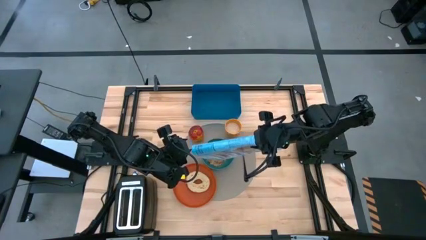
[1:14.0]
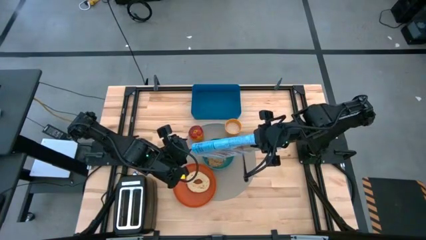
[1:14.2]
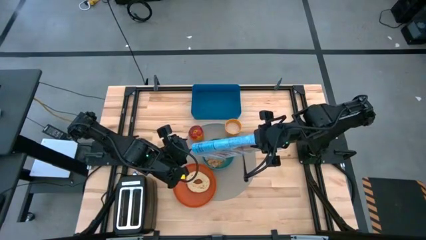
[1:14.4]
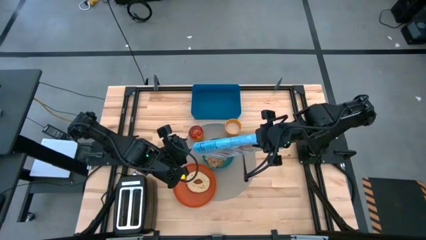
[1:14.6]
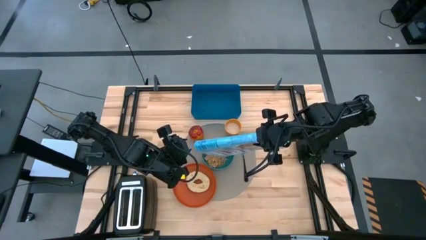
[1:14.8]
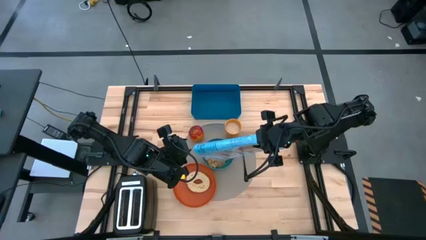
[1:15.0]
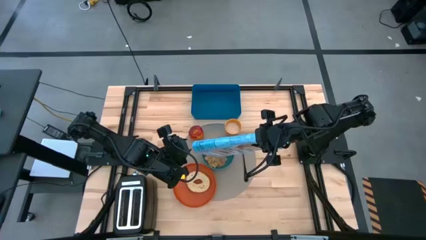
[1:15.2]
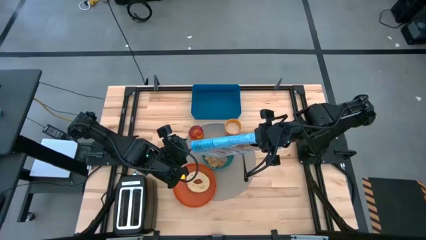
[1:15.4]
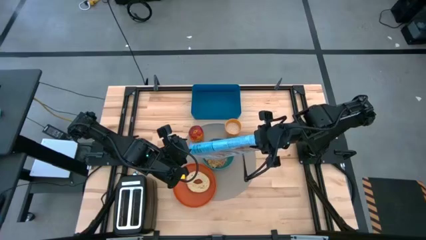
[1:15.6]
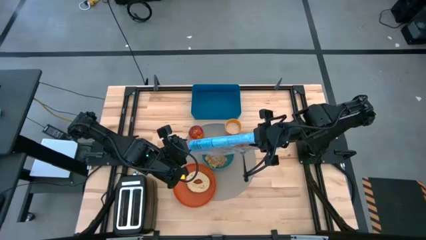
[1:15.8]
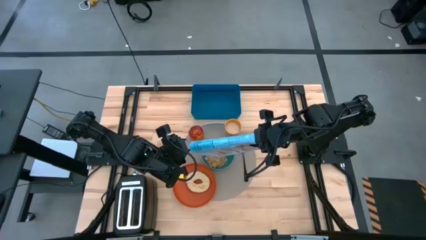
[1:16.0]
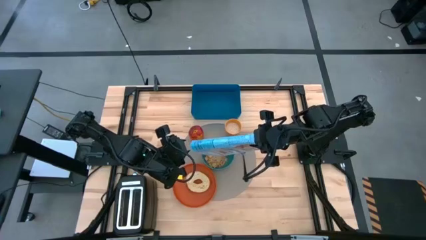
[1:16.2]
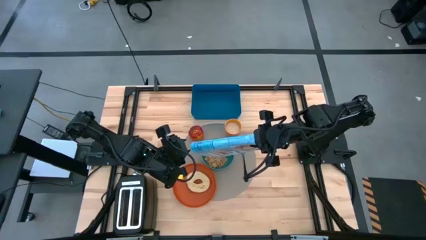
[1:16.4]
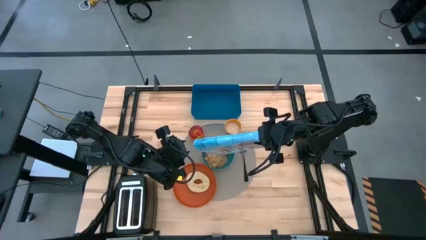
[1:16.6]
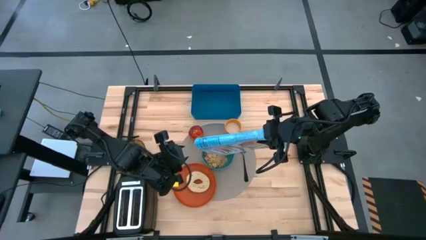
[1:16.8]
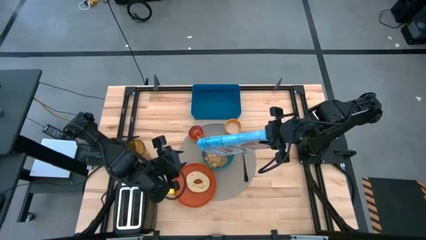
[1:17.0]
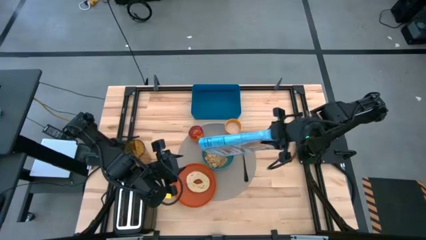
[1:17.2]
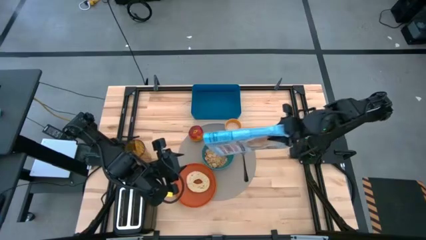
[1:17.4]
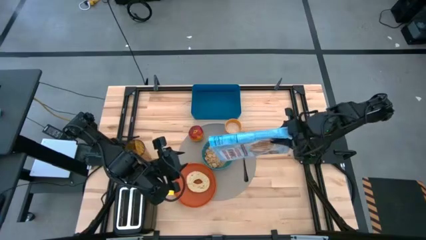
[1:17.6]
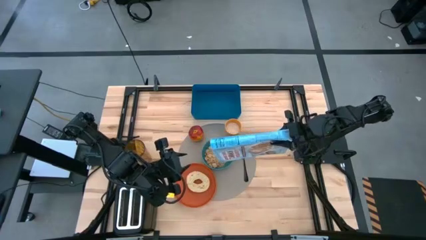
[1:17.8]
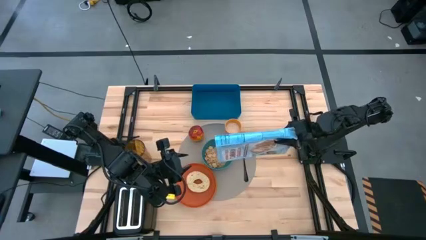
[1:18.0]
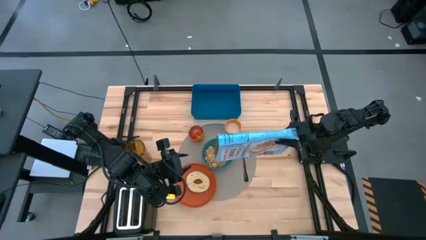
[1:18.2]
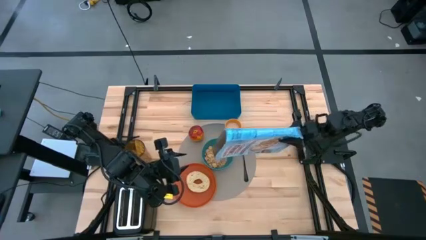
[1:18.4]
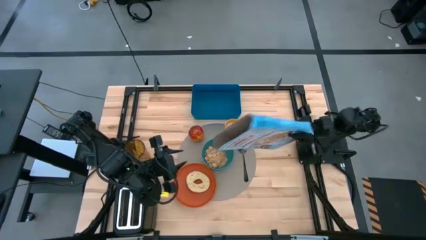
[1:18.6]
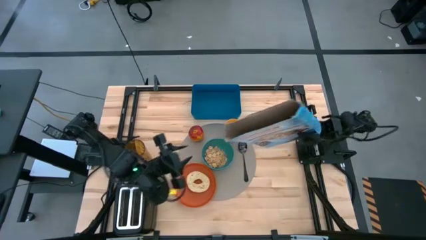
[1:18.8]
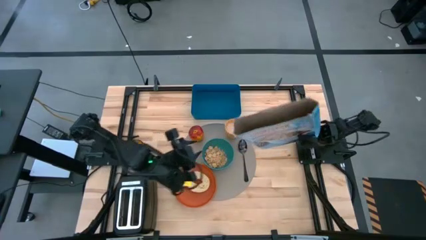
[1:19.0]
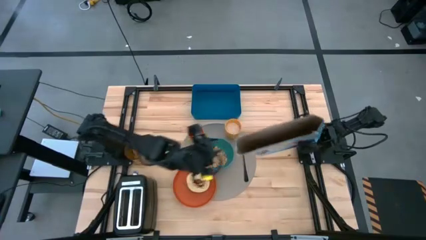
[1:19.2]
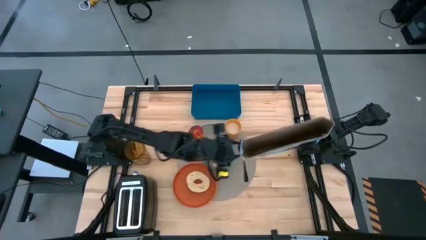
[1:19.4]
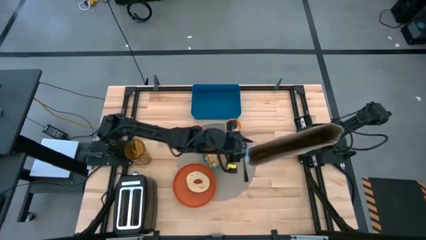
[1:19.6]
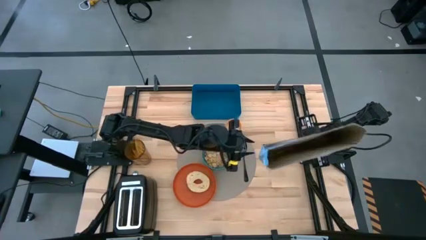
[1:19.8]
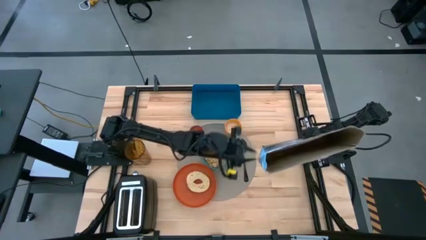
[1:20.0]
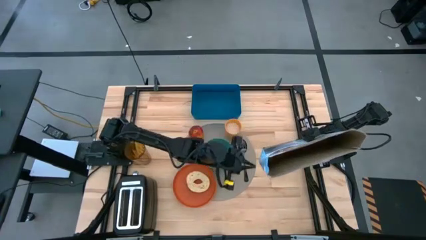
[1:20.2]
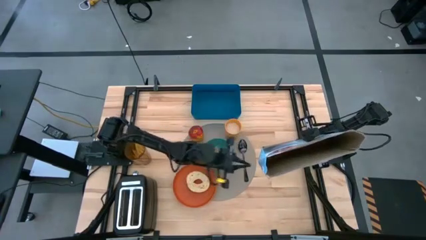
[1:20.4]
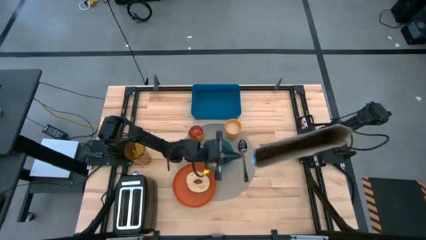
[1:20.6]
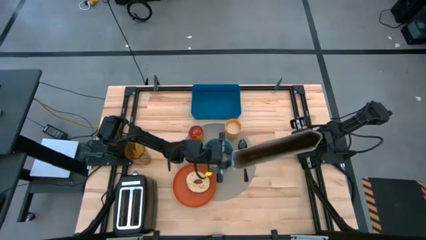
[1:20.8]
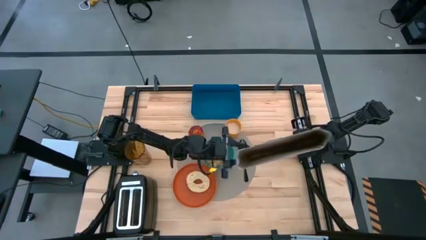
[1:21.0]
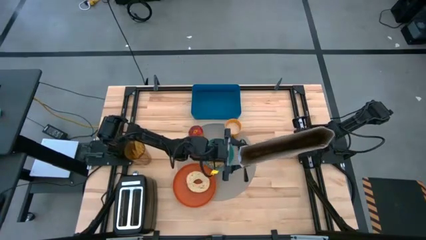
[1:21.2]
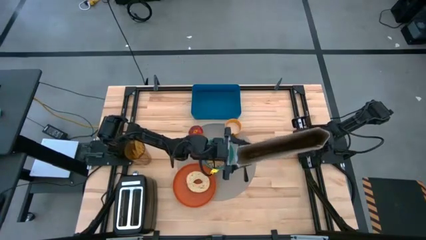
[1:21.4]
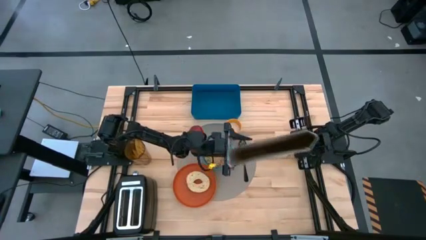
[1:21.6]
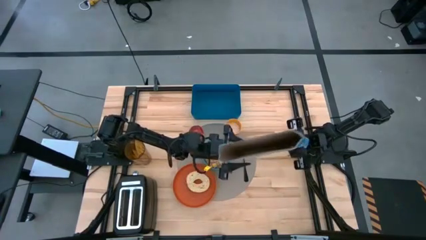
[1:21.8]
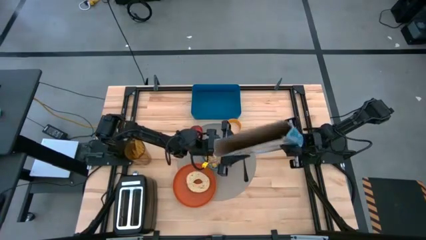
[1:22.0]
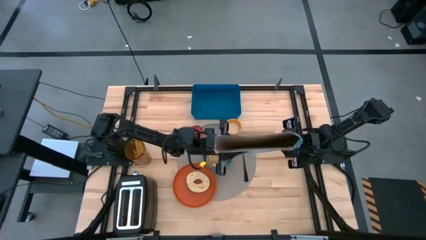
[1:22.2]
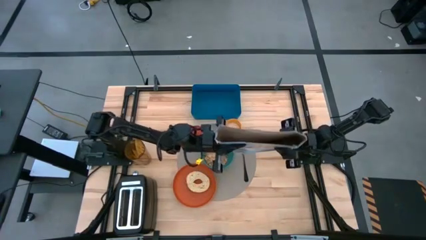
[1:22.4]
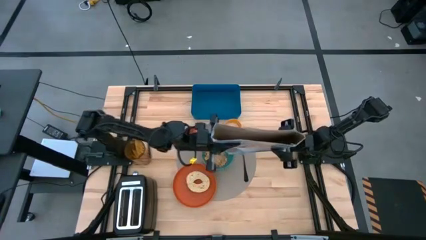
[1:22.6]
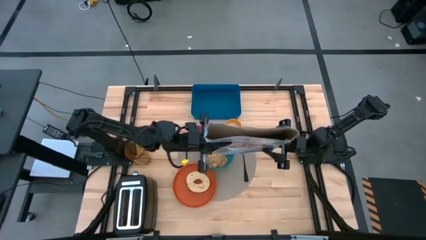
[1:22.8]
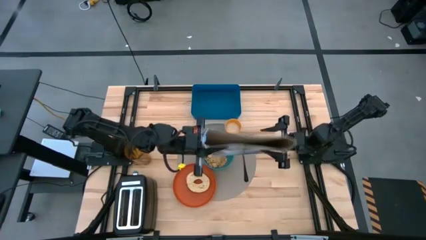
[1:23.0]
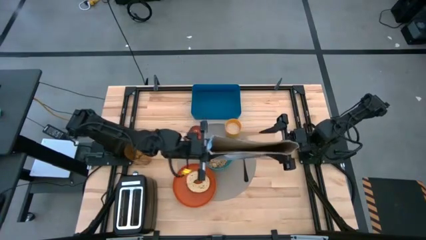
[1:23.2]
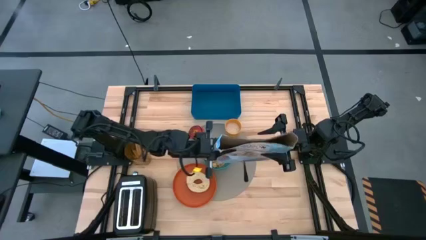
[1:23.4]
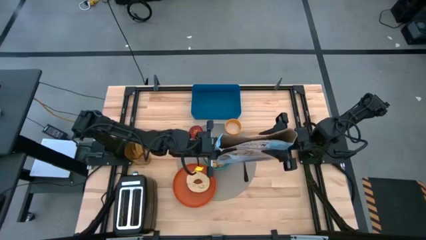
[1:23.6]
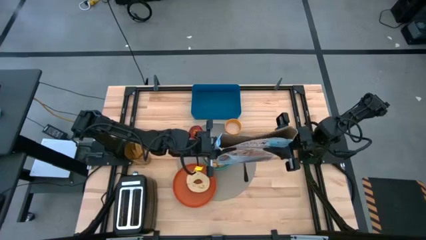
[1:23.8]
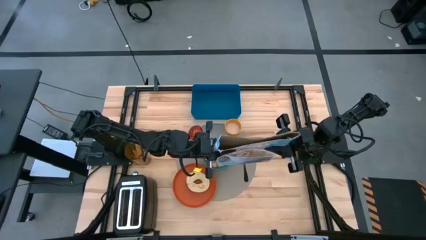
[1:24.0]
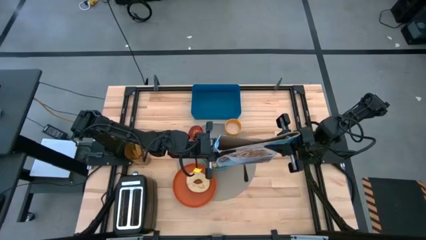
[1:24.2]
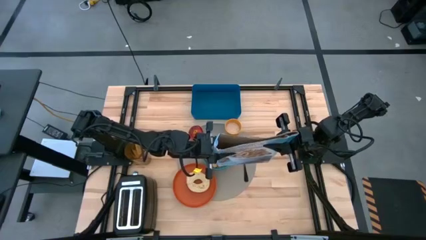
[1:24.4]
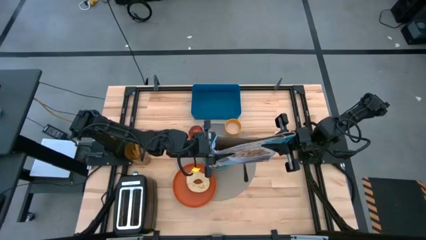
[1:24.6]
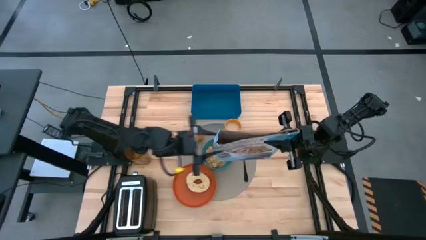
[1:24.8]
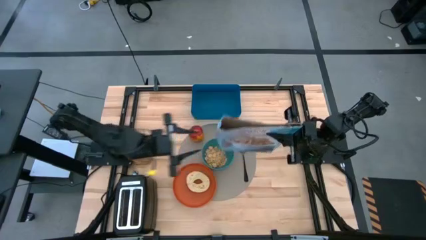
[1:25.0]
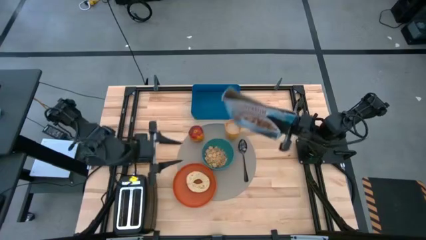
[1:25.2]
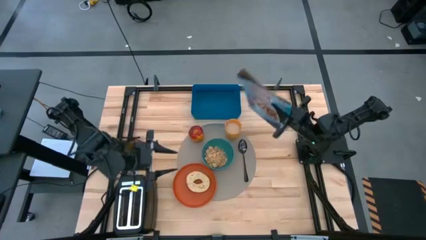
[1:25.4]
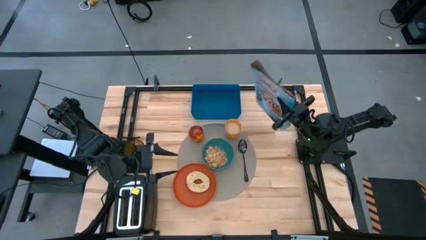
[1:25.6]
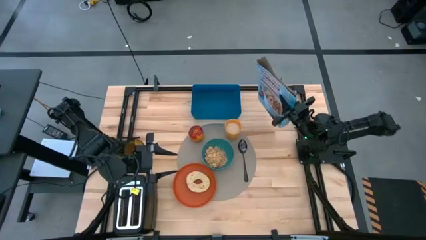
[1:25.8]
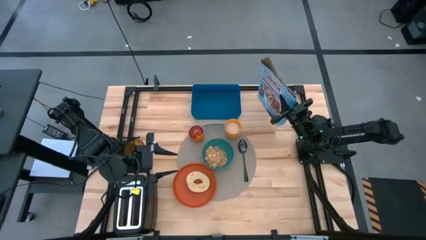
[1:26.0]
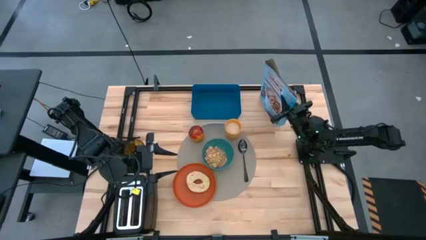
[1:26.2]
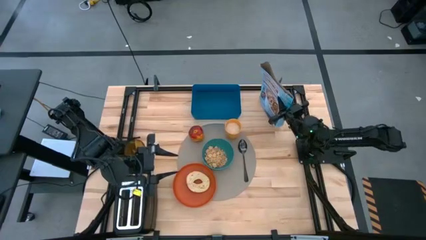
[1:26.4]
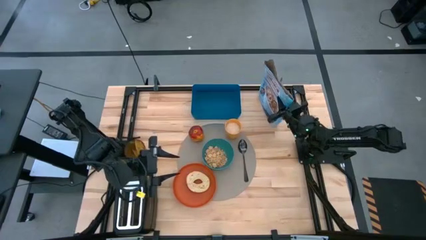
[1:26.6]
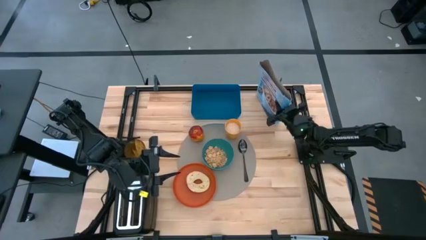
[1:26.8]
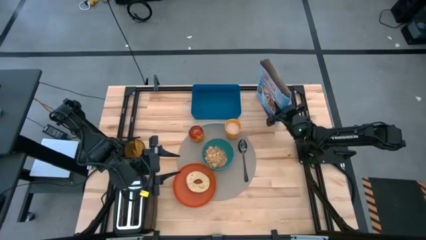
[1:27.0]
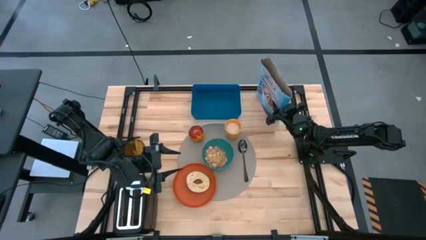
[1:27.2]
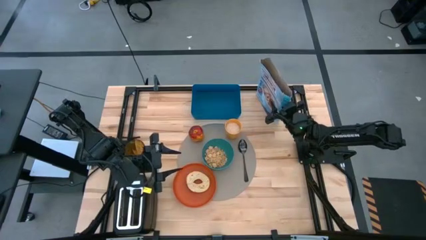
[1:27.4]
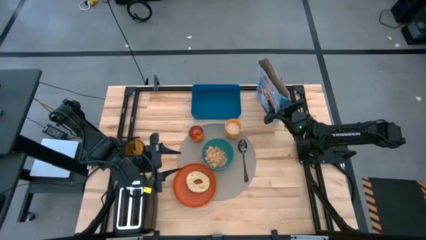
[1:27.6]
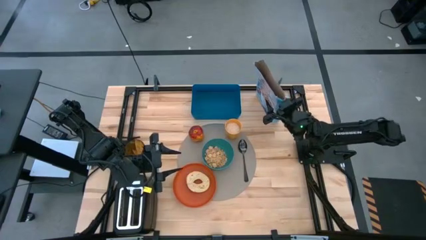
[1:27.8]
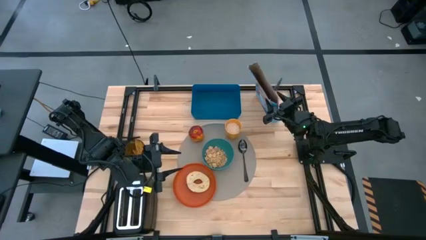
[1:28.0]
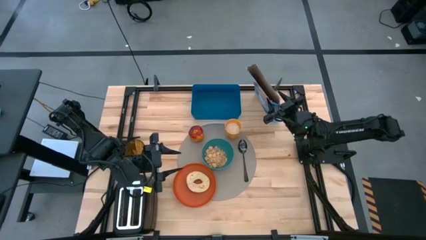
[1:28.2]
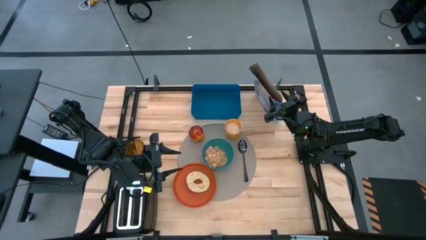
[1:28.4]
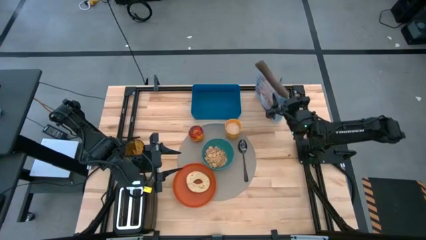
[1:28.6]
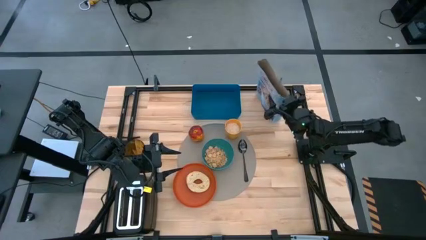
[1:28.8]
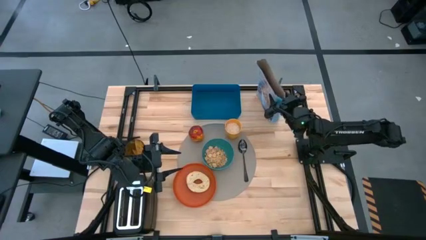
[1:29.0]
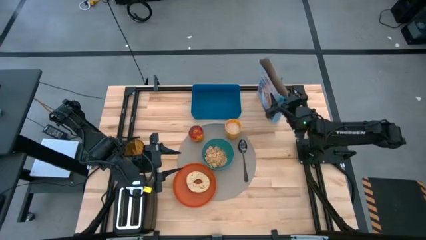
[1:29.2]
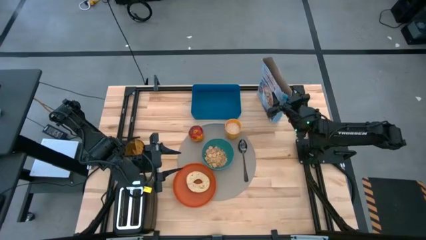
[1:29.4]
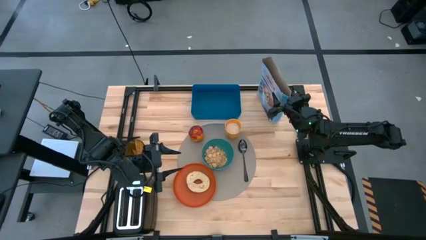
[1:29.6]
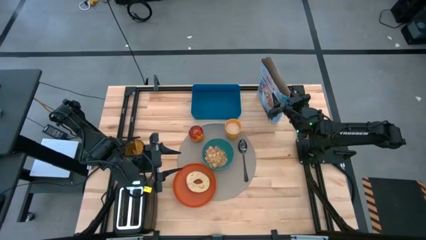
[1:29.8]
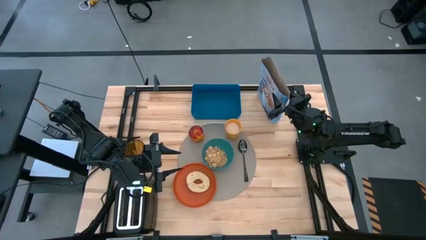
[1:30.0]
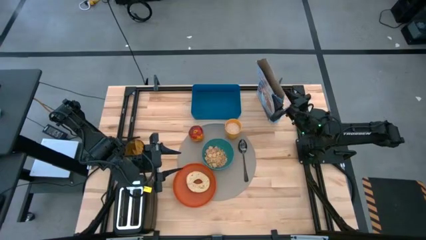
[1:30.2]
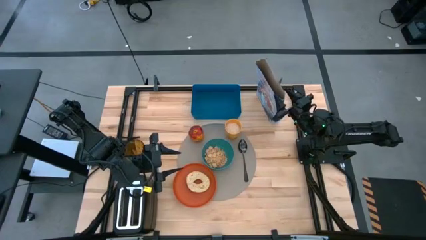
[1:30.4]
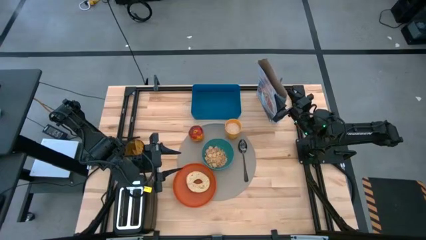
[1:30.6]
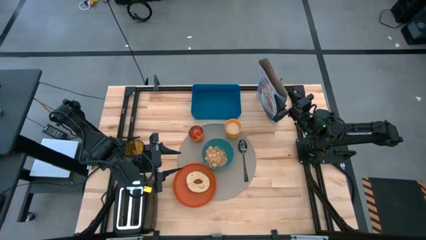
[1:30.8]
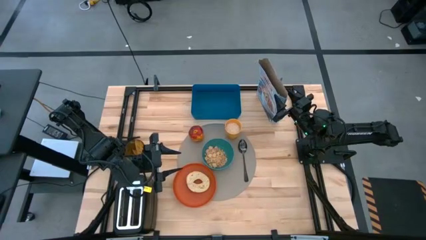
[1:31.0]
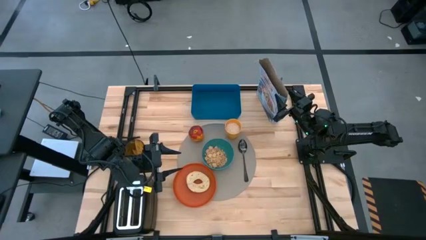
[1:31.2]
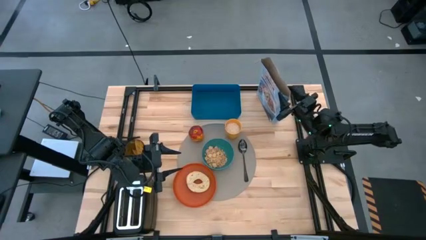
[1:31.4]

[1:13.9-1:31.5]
Task: Arrange a breakfast setting
Pour the cereal into the green bowl
